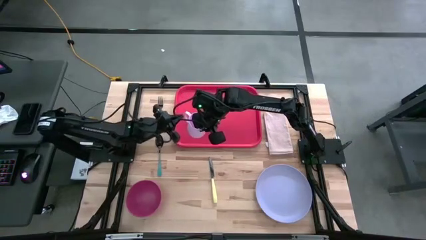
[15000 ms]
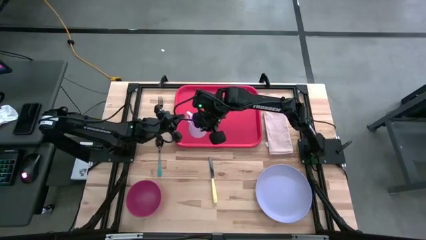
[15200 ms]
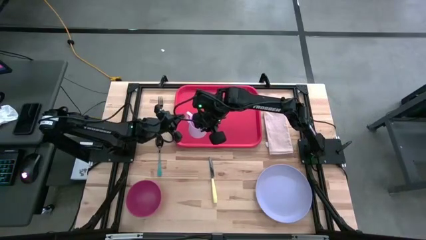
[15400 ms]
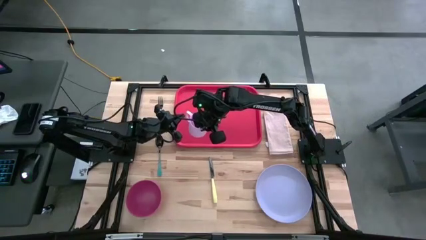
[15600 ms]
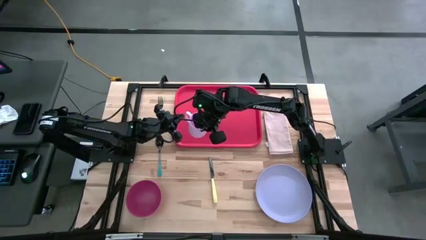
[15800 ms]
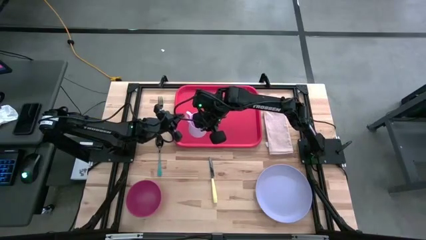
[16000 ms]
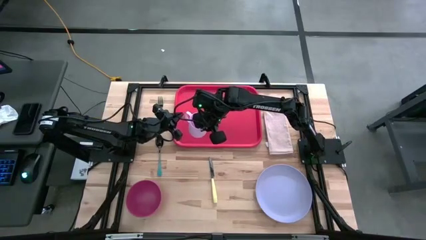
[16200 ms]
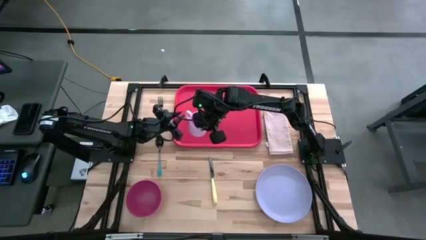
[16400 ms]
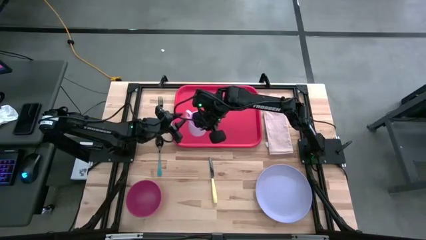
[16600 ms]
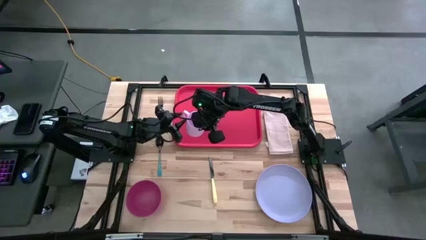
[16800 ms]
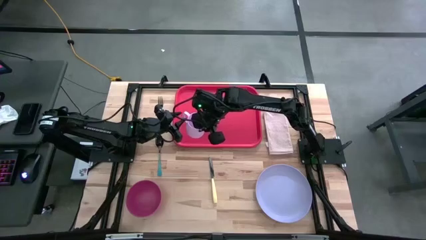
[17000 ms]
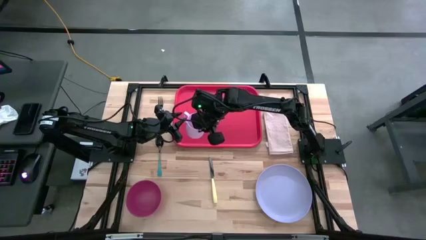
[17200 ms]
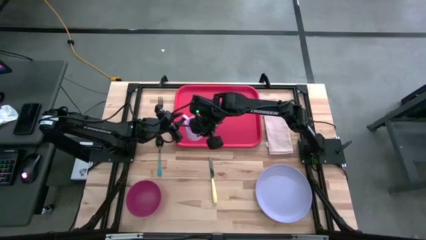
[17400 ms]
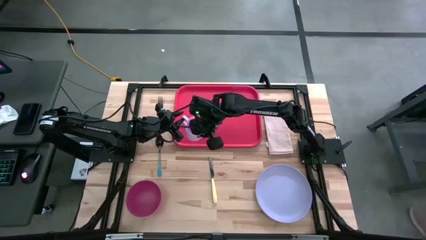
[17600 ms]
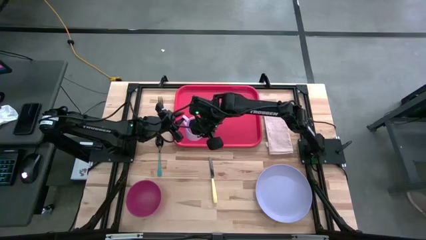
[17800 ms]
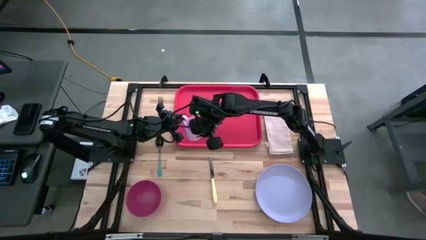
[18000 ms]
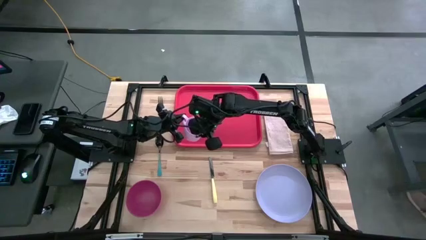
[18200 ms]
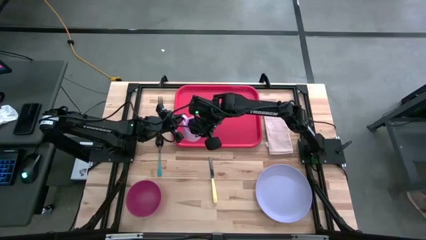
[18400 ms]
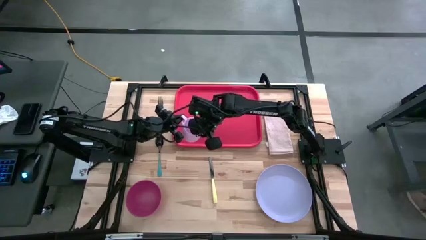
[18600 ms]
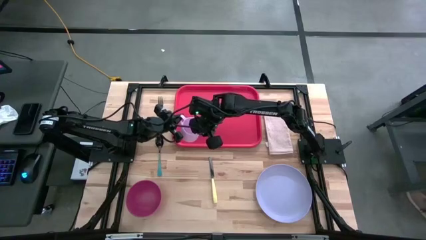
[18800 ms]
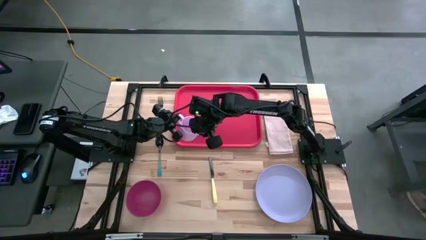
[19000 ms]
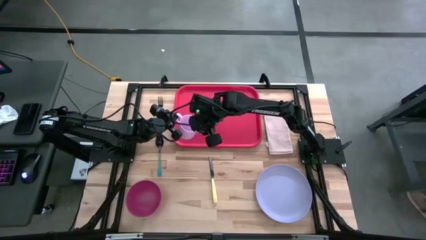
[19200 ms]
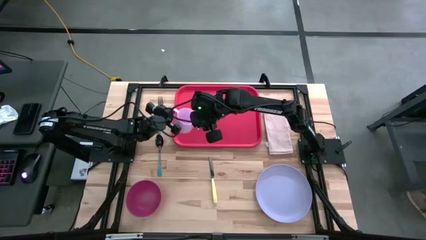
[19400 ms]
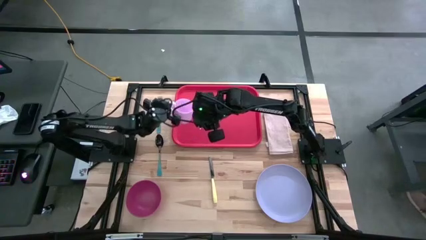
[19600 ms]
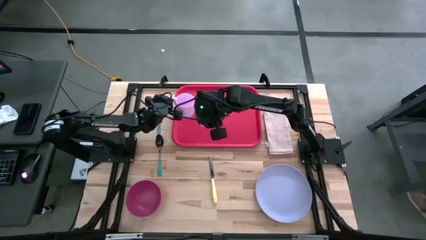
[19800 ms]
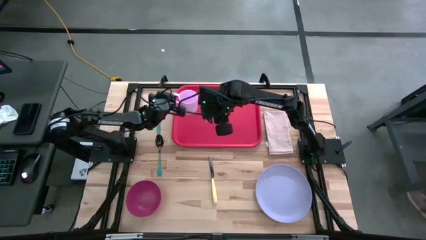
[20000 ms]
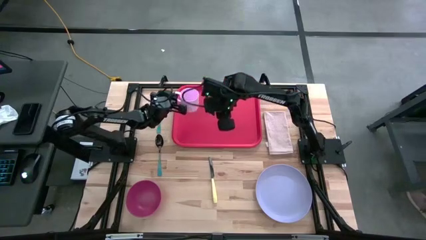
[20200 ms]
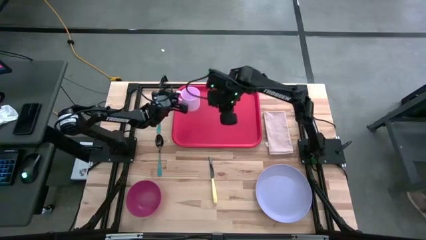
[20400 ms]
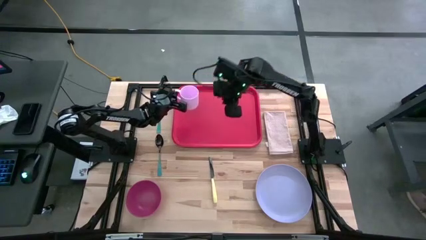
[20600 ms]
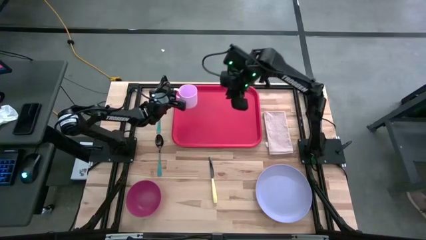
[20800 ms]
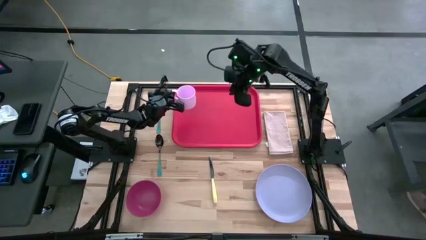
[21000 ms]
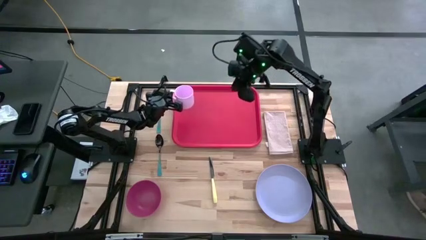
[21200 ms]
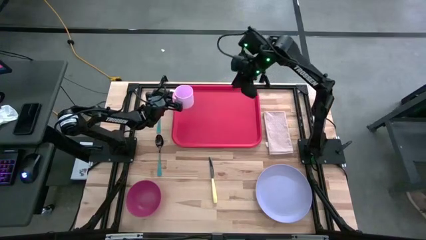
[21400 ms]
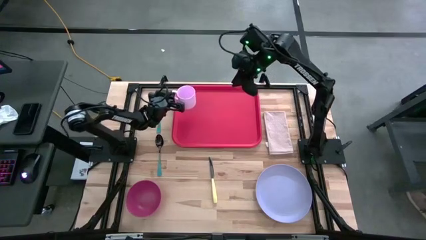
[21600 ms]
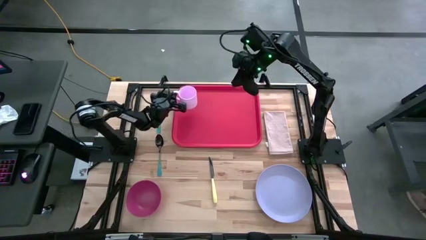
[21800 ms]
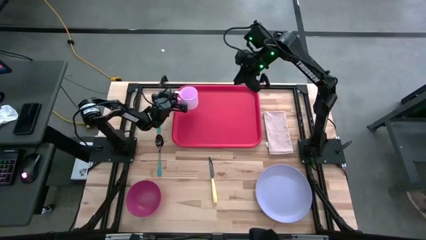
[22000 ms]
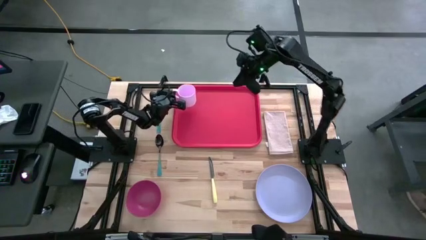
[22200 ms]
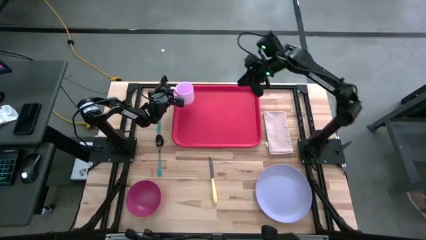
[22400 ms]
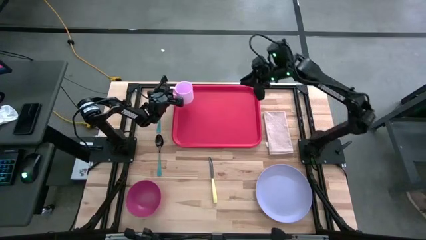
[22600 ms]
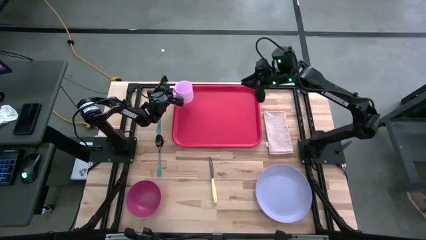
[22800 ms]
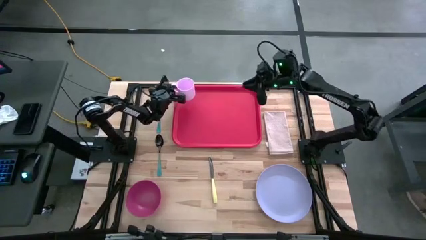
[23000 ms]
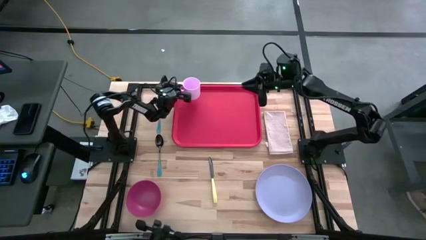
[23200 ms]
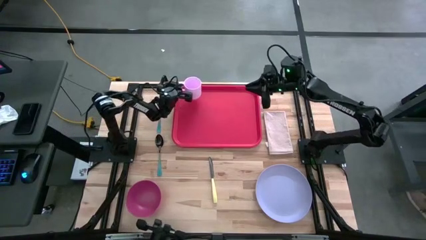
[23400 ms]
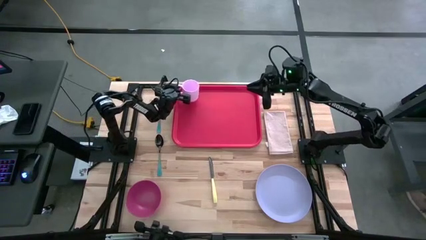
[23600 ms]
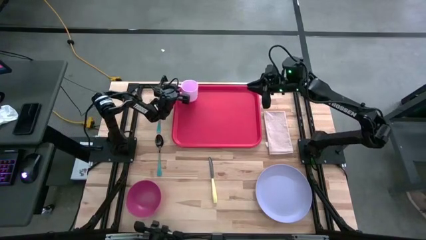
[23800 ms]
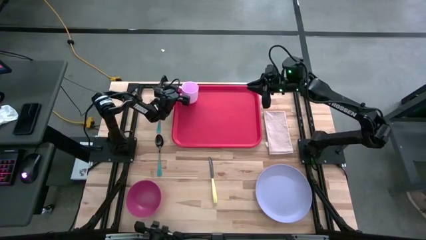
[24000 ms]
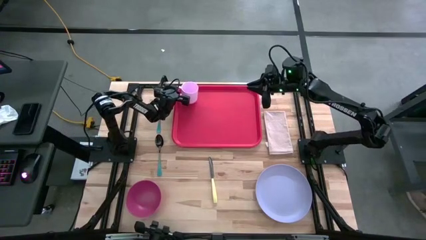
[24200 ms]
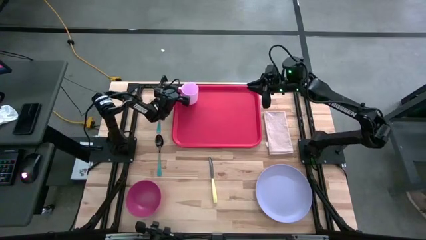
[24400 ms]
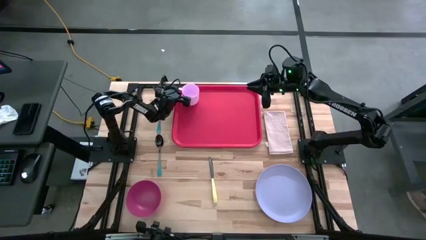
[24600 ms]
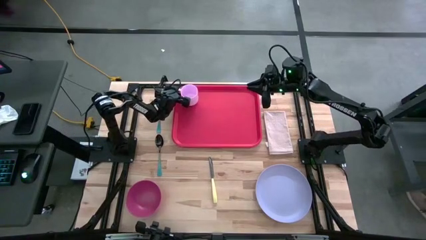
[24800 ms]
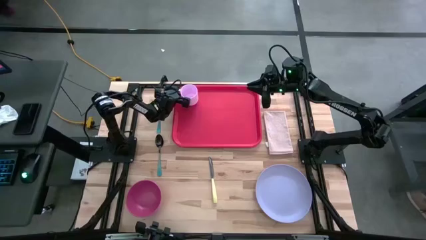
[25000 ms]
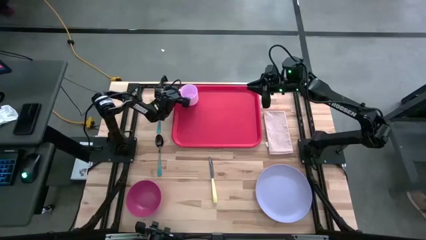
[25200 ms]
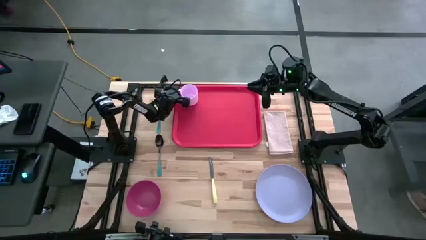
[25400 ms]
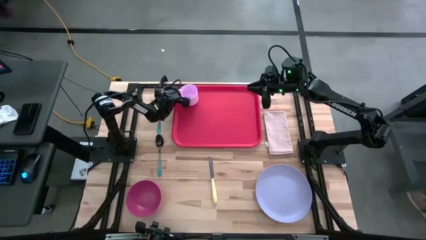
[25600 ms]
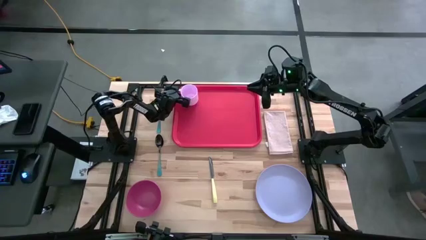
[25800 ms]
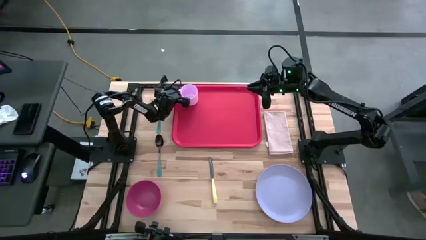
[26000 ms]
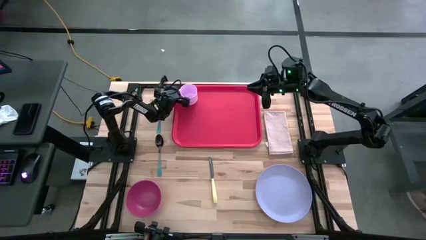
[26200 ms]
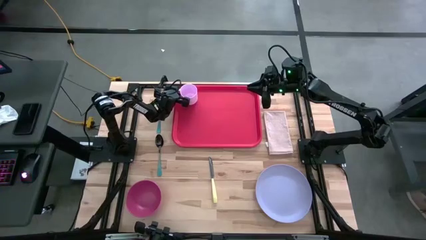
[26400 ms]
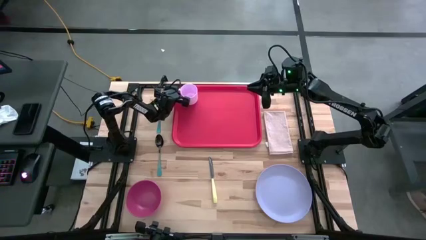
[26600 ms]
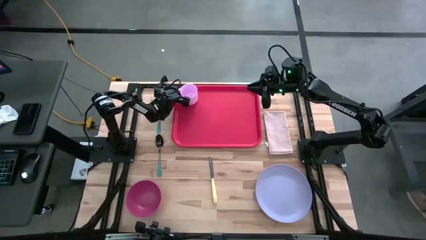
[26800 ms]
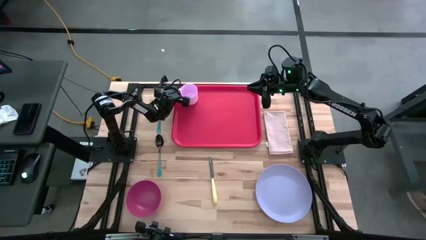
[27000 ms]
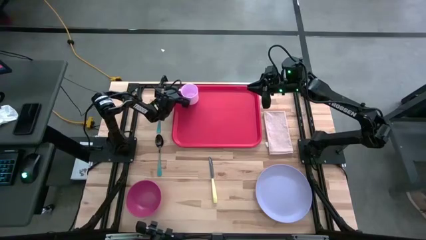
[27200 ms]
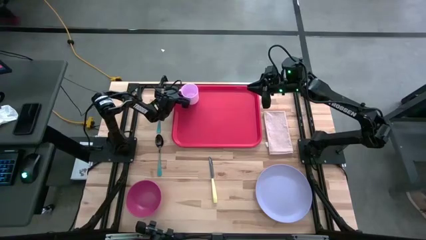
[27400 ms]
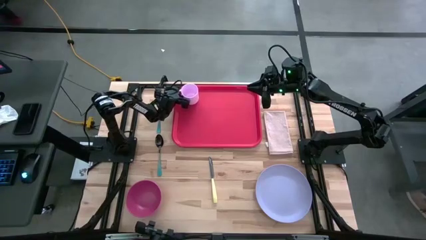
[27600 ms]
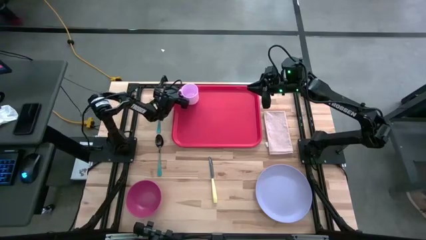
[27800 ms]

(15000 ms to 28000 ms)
Task: Set up tray
Put the pink mug on the red tray
